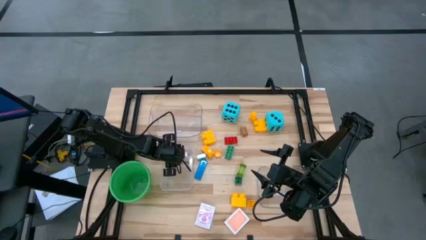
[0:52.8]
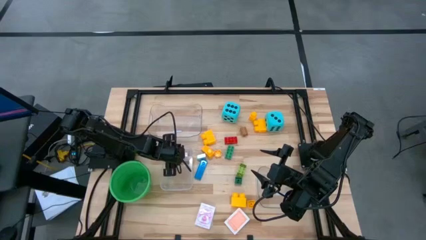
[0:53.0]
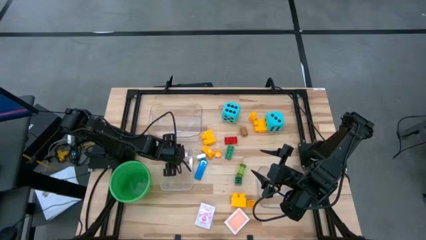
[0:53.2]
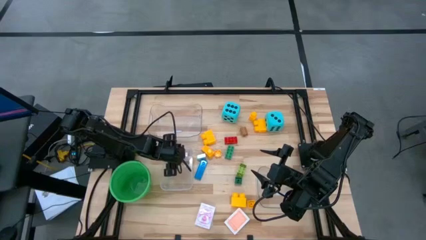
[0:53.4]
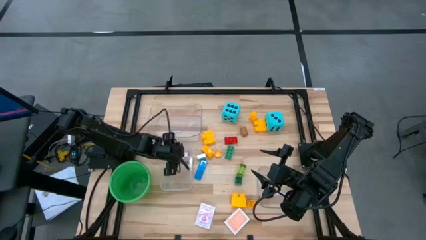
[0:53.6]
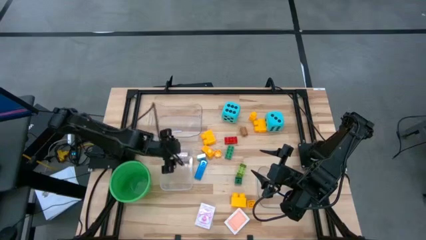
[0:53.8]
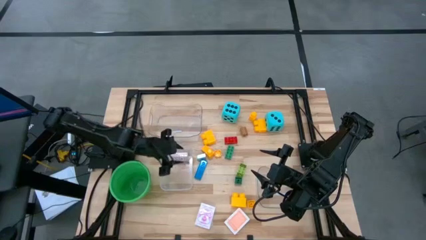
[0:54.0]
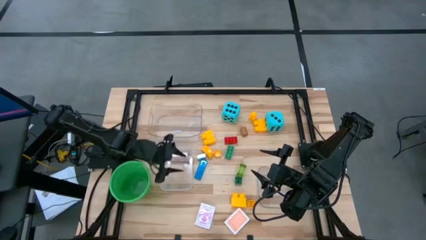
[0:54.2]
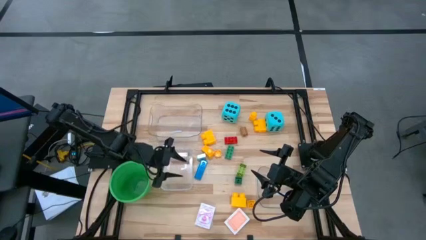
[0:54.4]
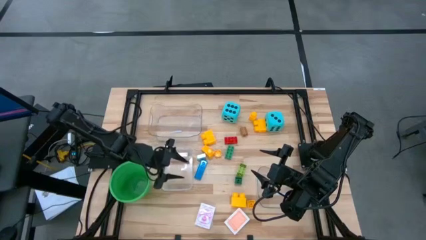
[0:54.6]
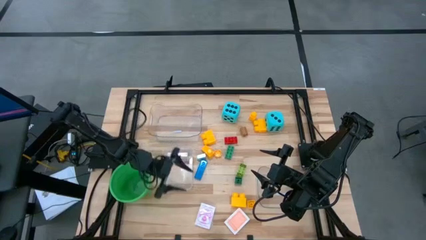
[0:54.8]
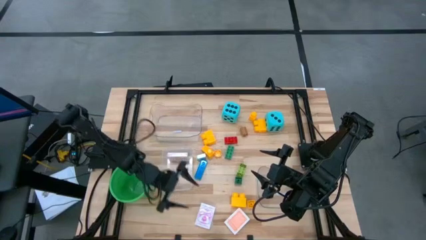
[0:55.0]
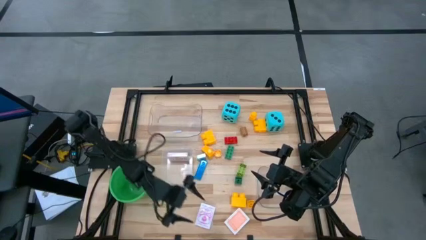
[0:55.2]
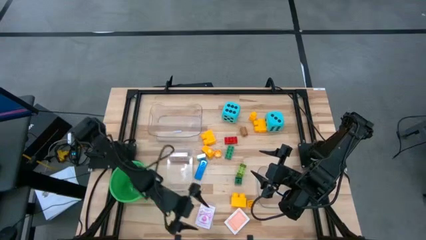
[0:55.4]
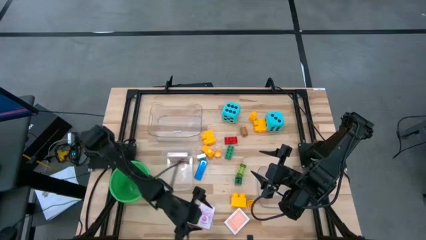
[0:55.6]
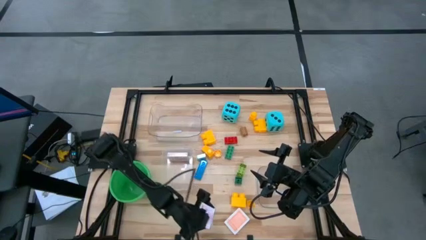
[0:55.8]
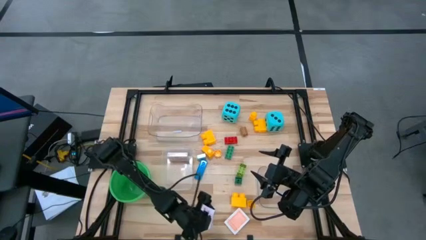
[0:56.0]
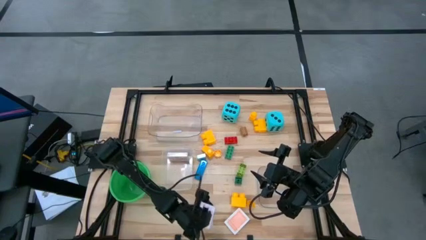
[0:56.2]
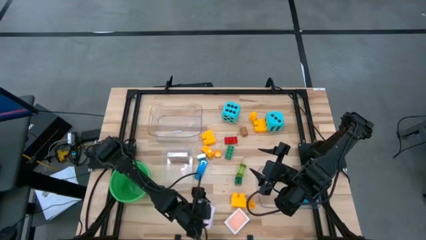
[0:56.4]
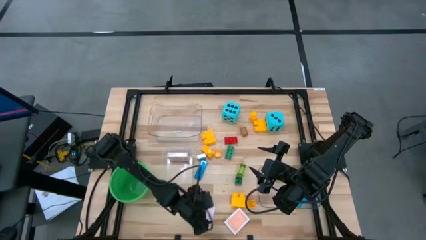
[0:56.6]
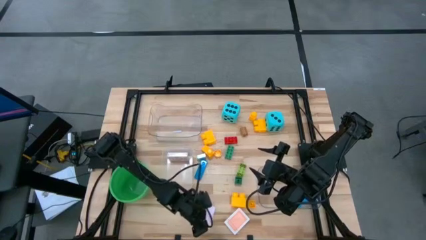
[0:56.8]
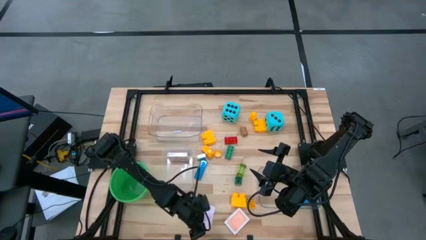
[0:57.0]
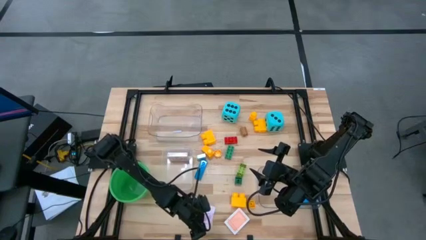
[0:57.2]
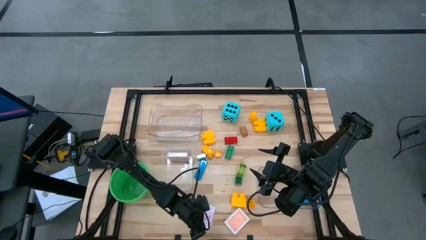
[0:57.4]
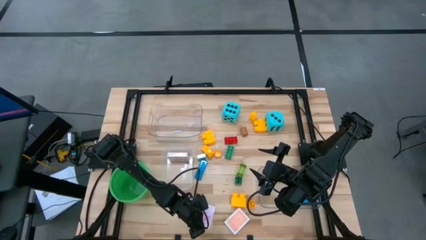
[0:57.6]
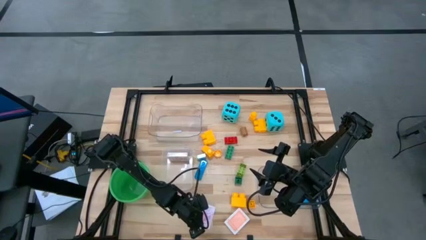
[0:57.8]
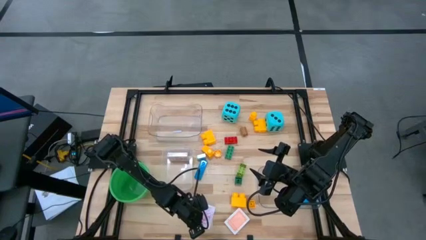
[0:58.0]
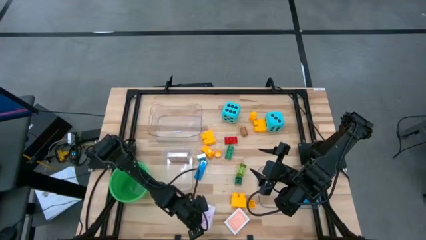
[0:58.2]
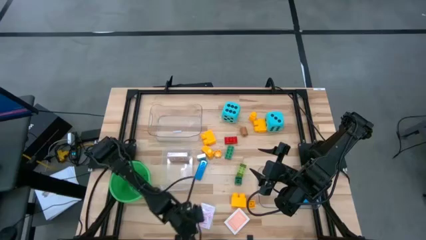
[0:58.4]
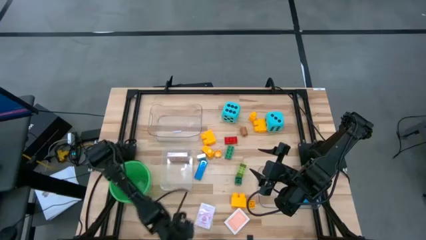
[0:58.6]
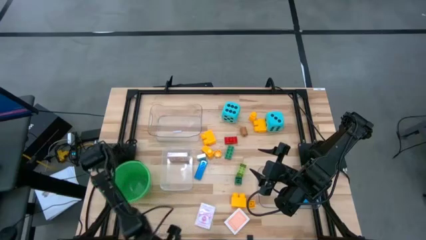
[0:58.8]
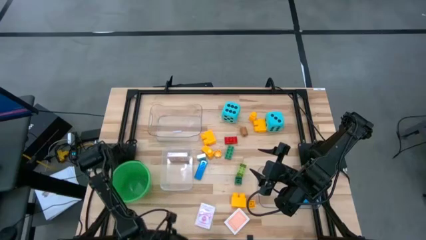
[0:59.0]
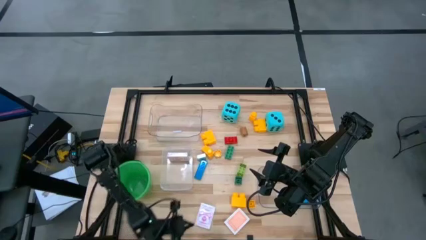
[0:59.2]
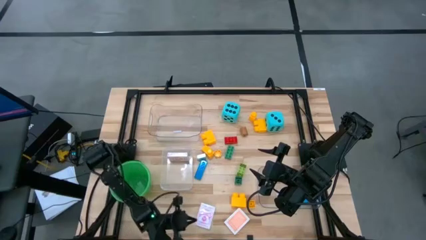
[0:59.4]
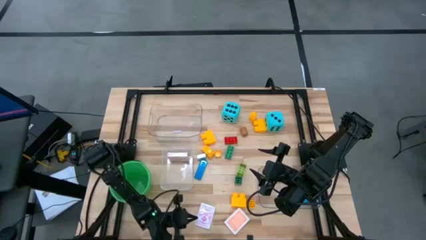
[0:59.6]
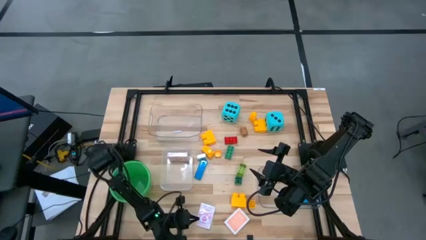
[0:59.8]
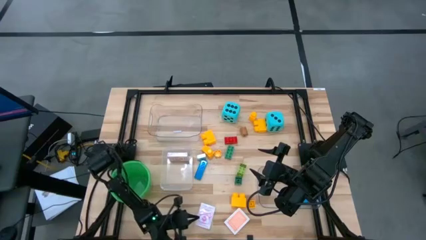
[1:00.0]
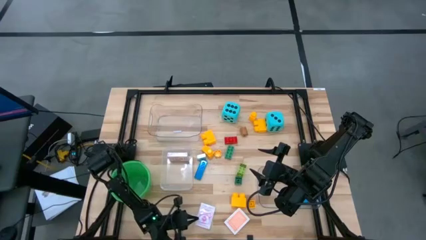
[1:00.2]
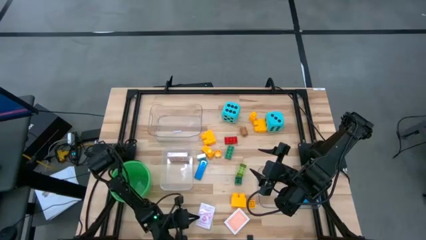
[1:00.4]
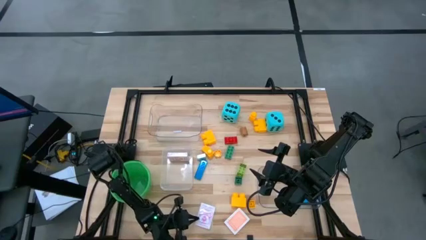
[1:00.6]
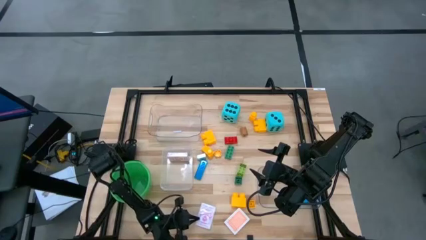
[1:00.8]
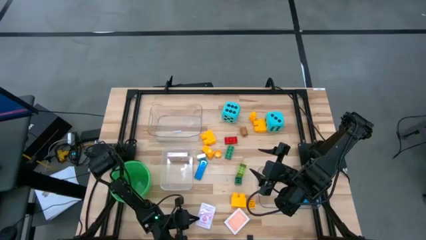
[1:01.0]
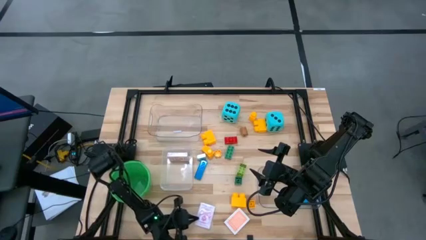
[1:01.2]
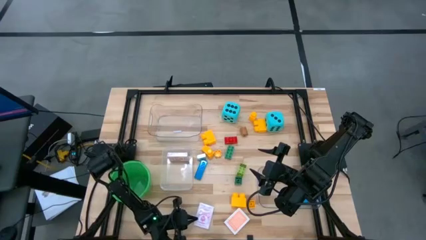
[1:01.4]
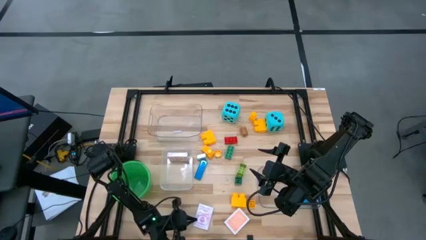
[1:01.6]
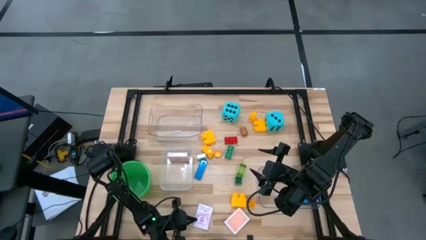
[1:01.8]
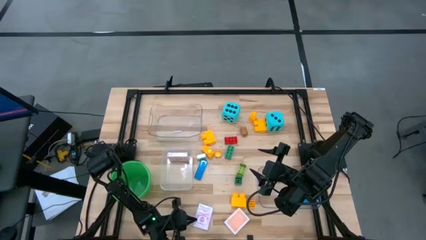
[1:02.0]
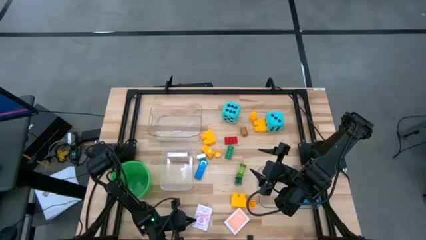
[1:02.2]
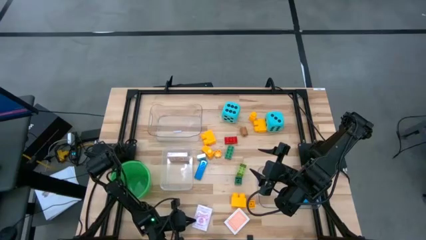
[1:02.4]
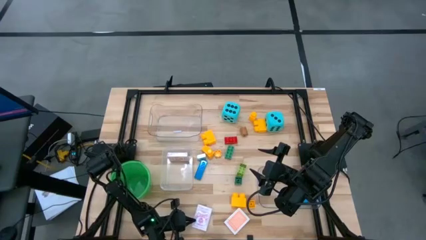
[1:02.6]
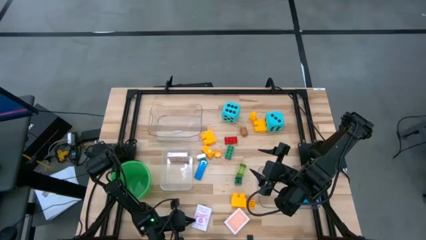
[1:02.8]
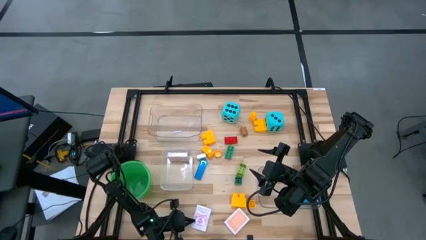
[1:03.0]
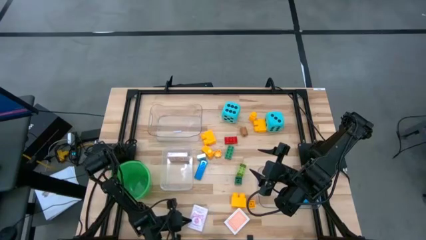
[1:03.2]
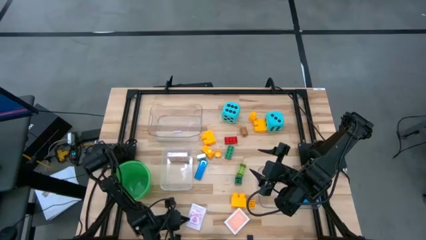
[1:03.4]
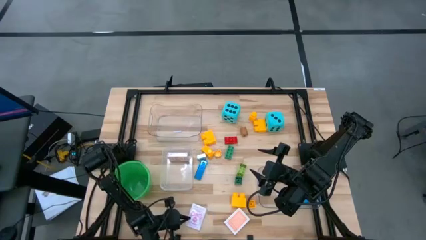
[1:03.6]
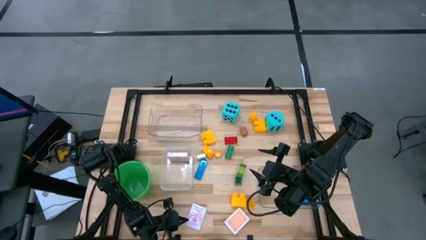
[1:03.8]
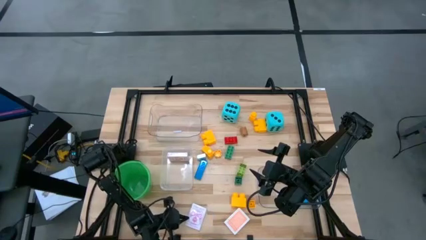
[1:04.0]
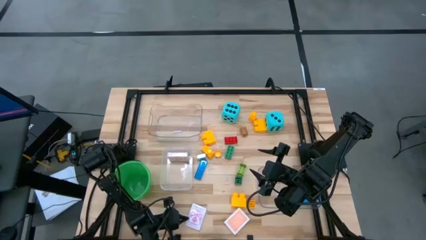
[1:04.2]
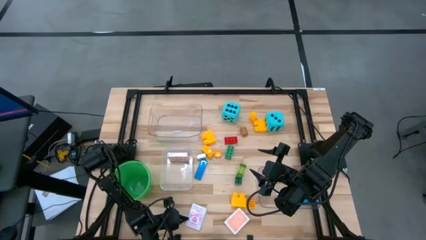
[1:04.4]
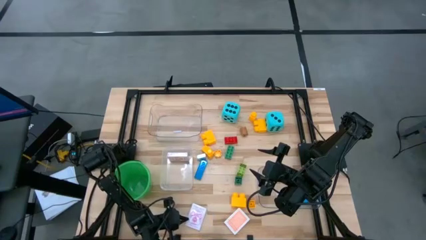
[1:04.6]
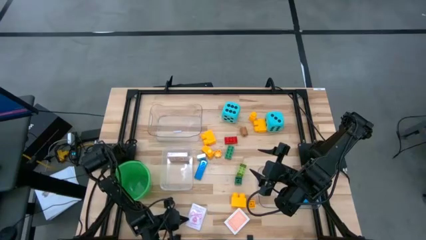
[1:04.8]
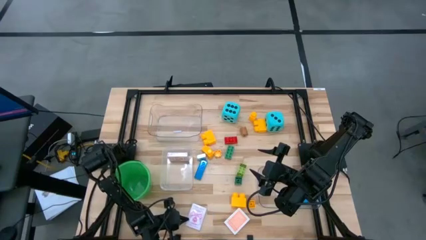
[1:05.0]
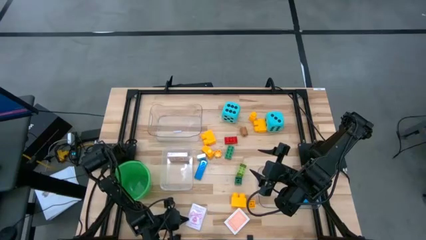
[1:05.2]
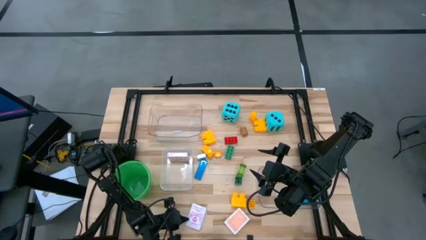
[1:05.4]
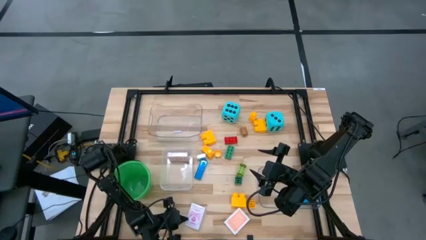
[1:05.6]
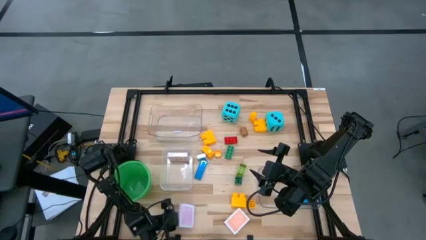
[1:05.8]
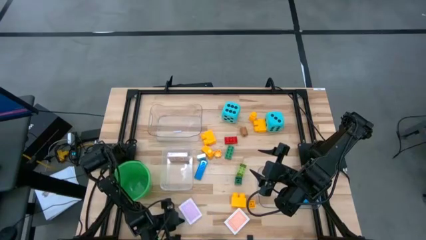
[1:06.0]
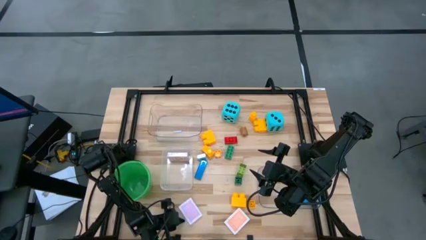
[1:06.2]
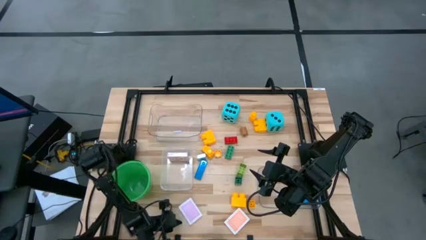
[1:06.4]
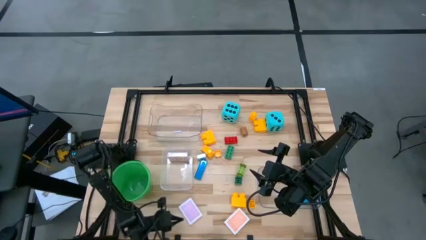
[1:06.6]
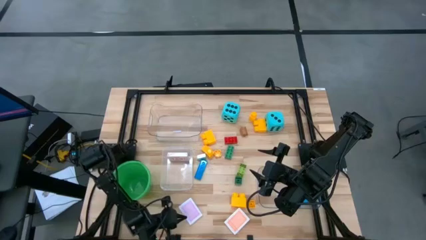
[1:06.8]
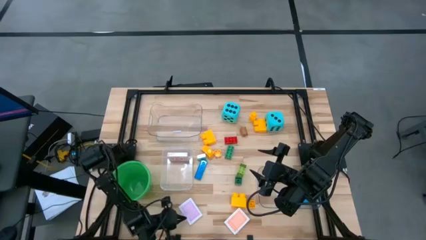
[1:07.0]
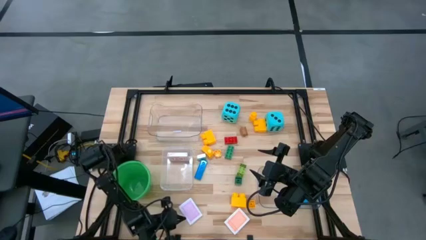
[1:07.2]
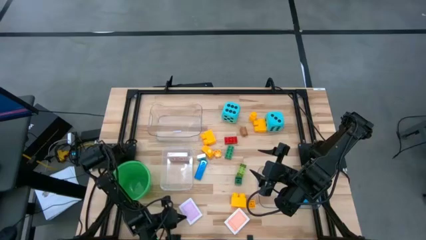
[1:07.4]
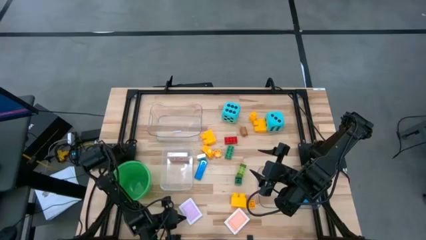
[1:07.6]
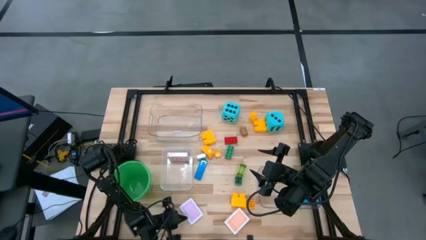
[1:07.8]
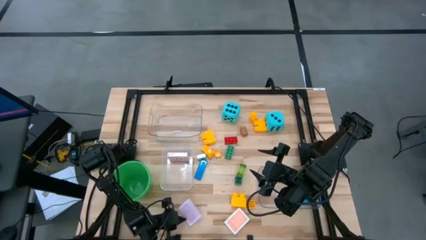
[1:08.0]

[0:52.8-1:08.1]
Task: Pick & Place Toys
Put the pink playing card box into the bottom left transparent bin

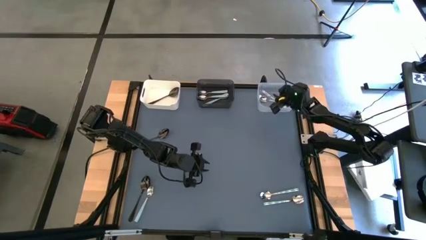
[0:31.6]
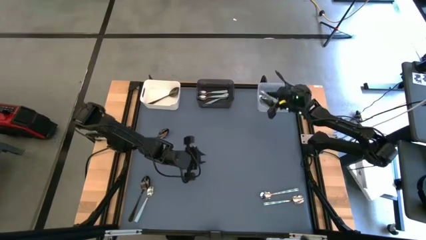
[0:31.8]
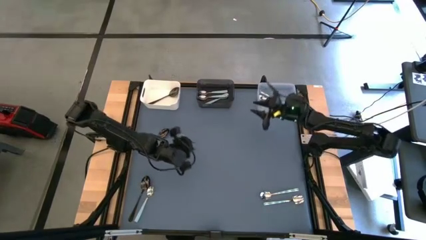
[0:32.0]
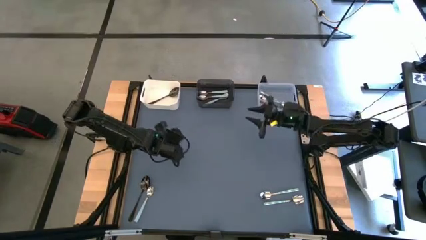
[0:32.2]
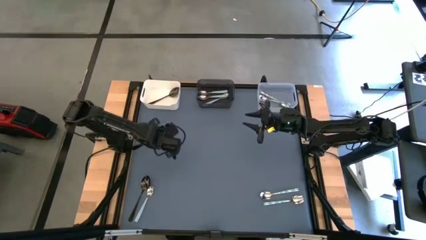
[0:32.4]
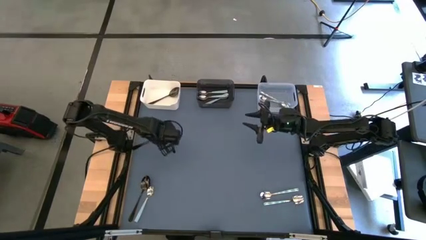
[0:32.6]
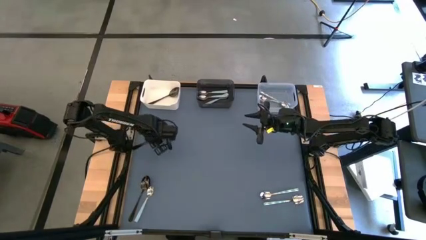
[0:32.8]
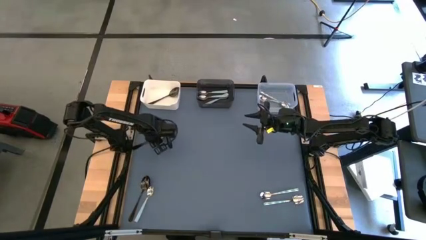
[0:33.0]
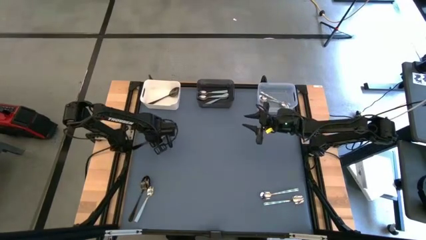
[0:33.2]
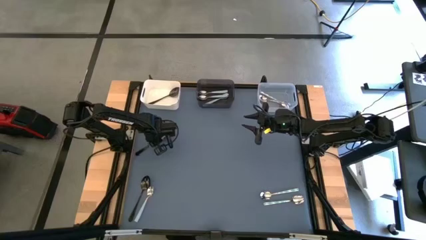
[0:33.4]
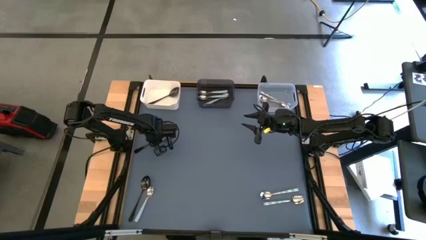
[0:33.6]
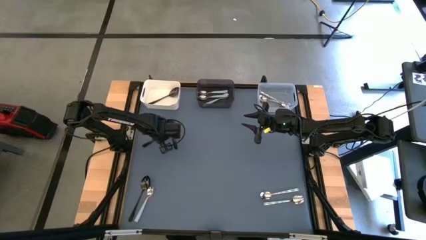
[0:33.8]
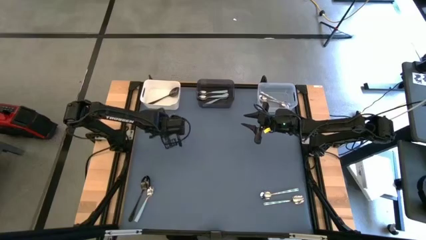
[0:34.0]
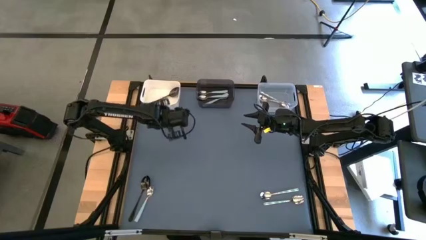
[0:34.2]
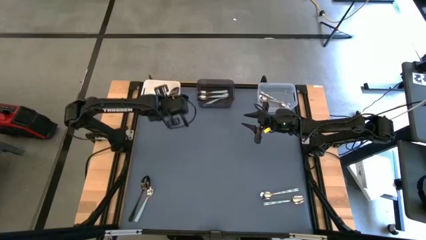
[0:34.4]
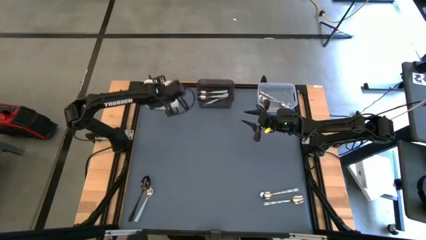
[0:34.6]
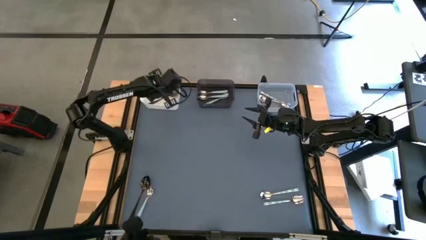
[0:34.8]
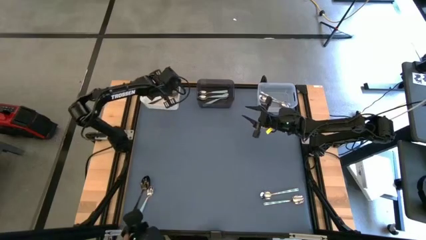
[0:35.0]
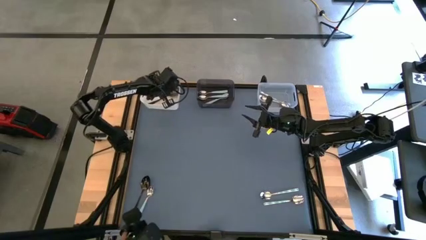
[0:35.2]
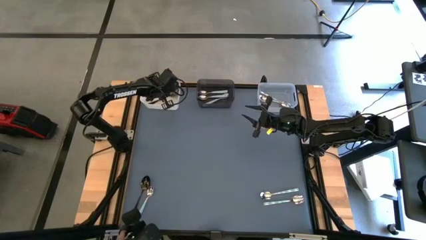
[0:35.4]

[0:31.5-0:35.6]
Task: Sort silverware by color (type)
Put the top left black spoon into the white bin
